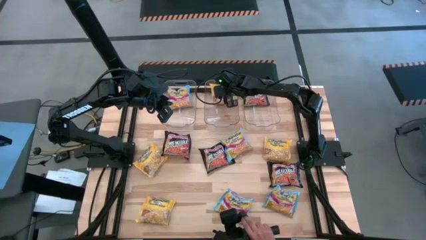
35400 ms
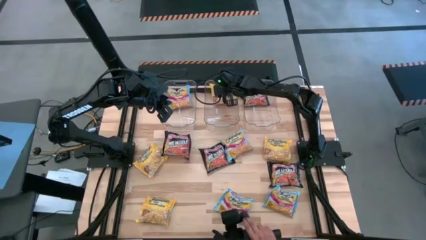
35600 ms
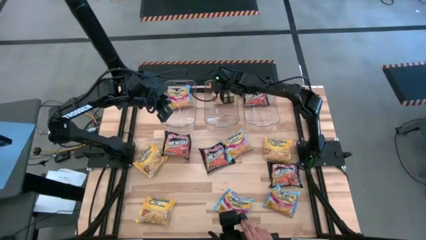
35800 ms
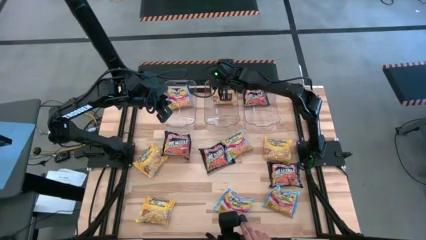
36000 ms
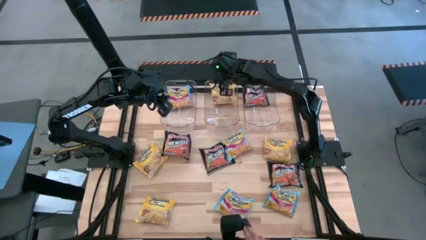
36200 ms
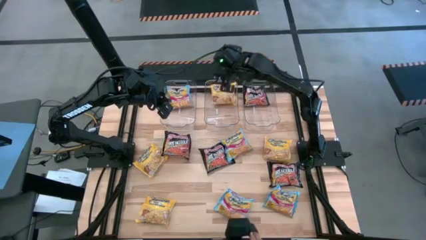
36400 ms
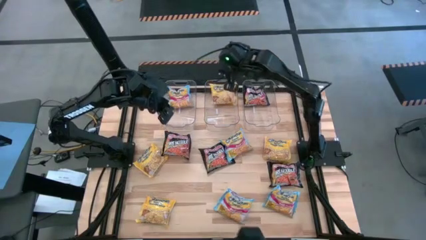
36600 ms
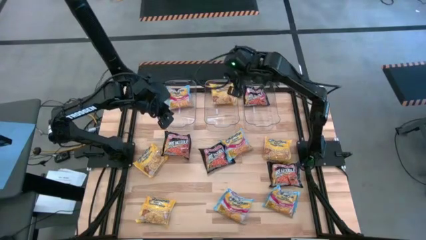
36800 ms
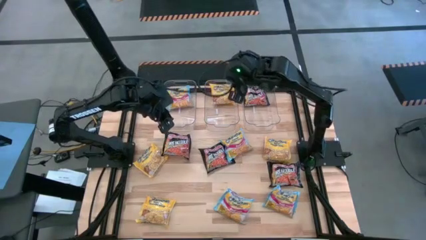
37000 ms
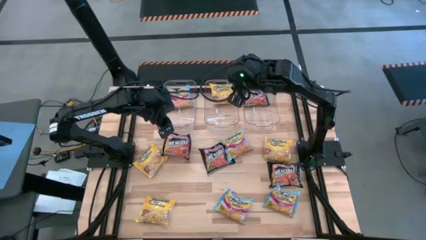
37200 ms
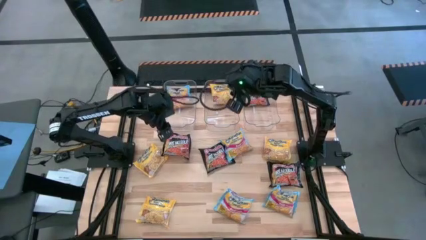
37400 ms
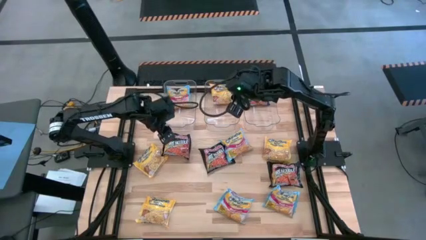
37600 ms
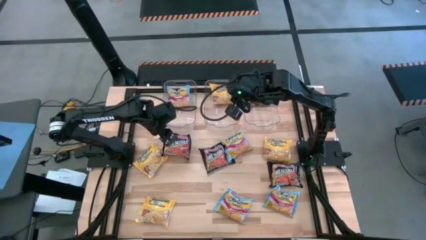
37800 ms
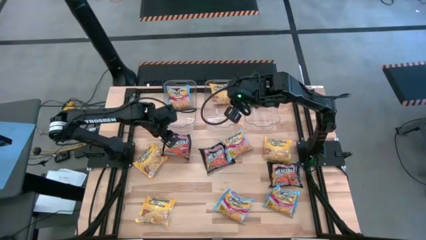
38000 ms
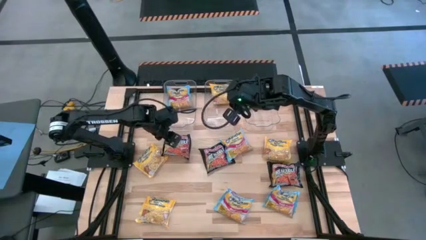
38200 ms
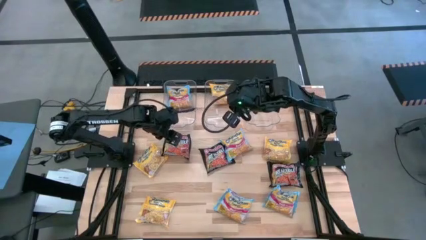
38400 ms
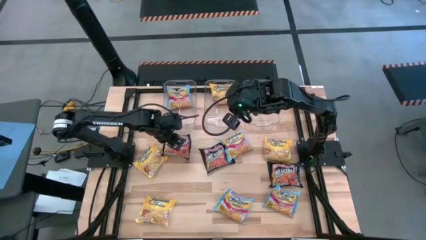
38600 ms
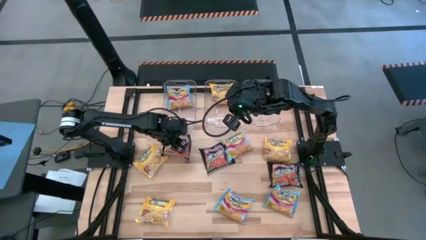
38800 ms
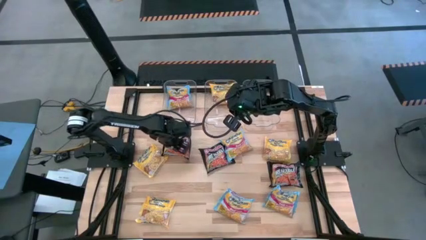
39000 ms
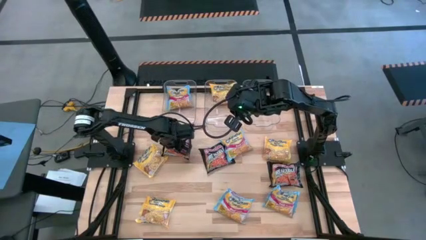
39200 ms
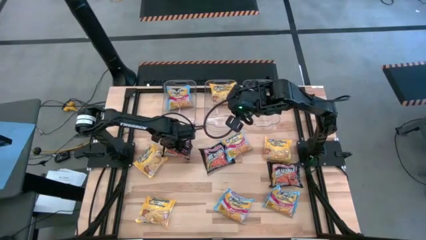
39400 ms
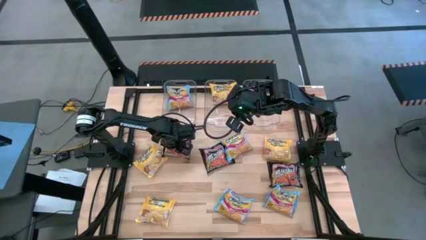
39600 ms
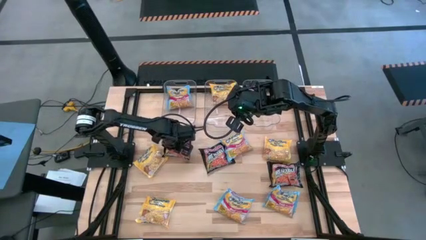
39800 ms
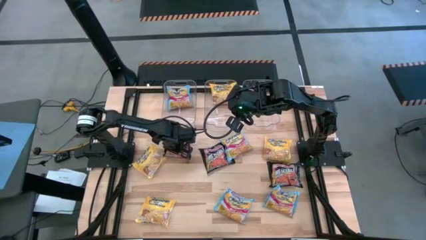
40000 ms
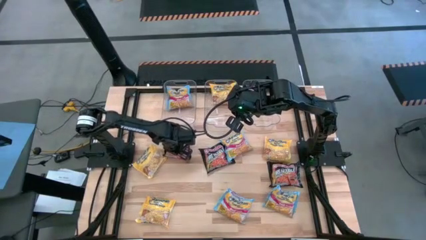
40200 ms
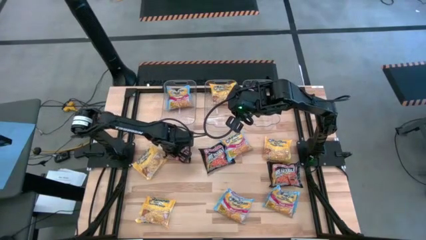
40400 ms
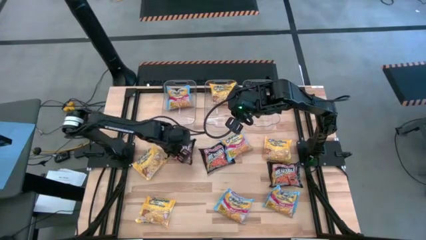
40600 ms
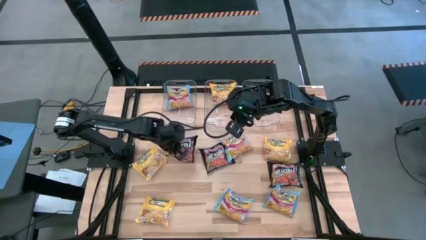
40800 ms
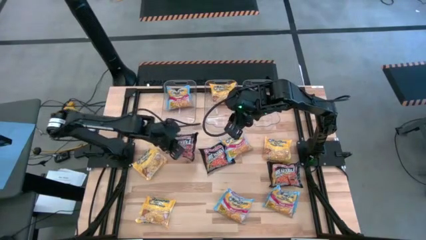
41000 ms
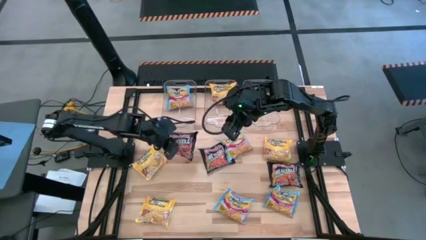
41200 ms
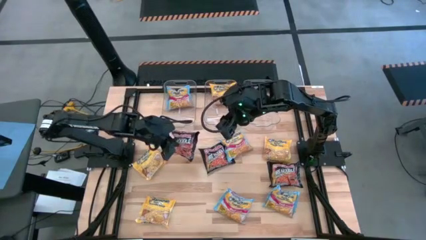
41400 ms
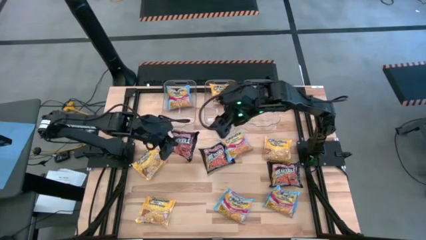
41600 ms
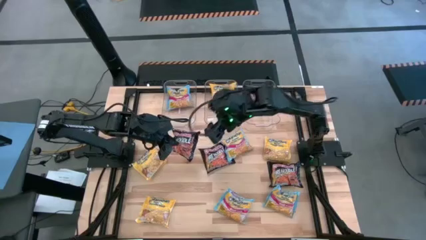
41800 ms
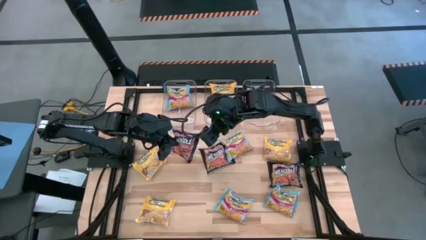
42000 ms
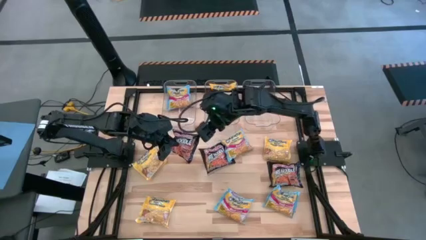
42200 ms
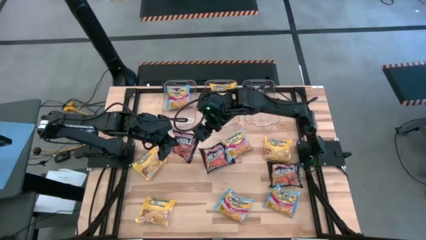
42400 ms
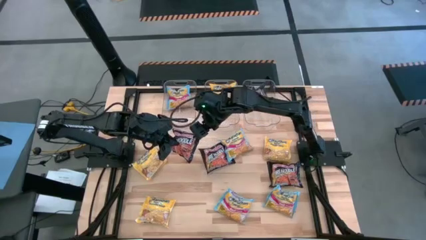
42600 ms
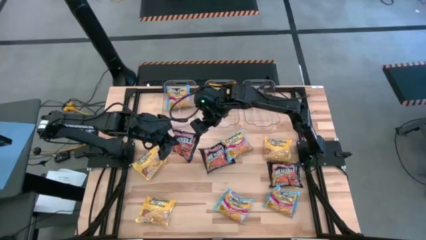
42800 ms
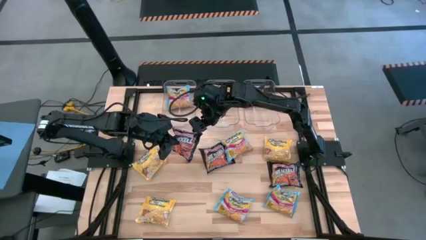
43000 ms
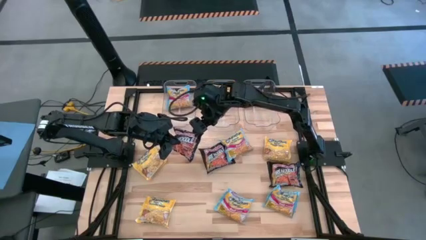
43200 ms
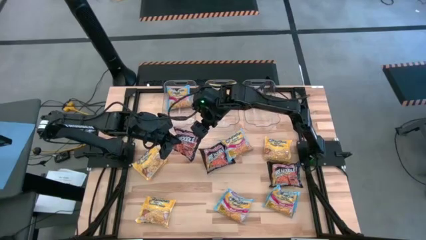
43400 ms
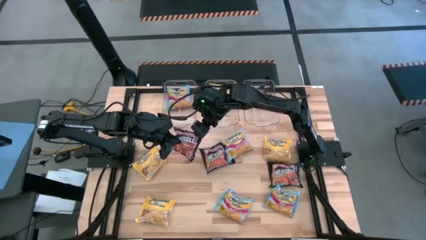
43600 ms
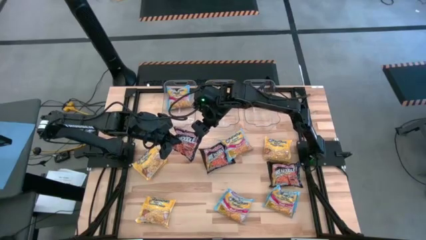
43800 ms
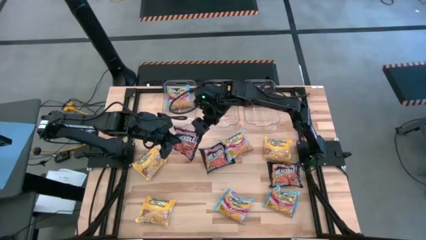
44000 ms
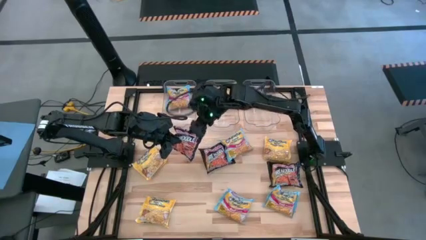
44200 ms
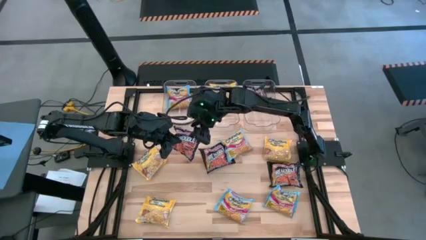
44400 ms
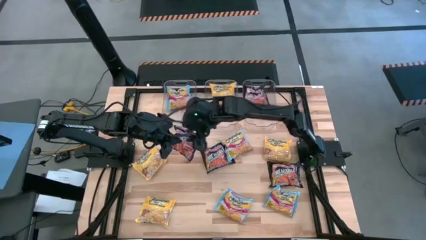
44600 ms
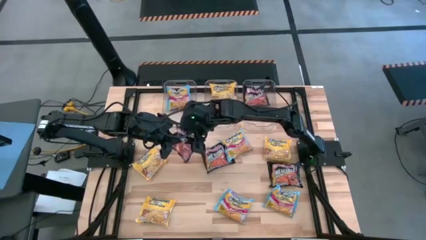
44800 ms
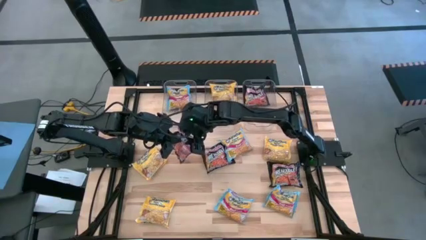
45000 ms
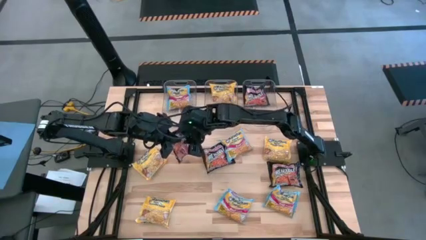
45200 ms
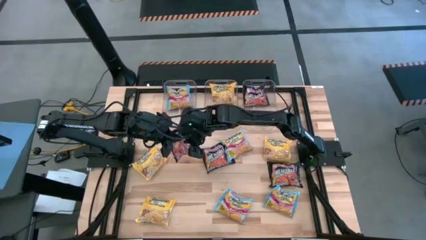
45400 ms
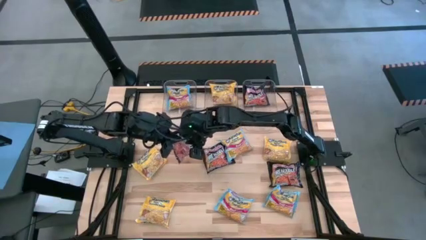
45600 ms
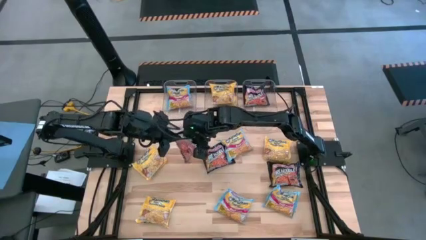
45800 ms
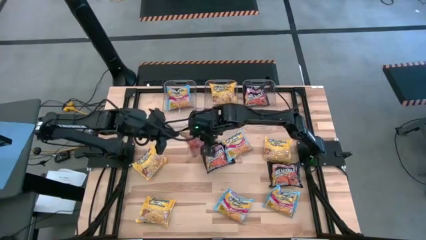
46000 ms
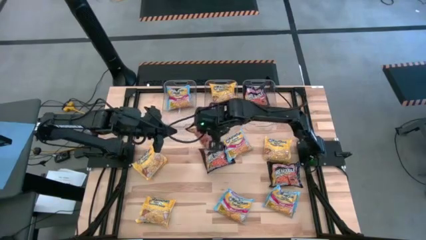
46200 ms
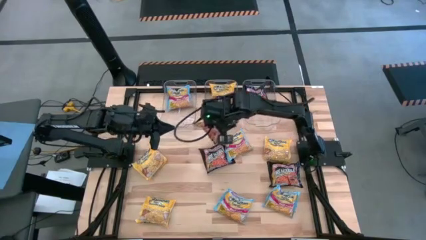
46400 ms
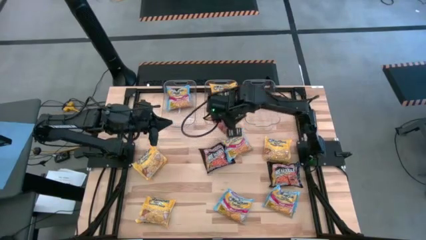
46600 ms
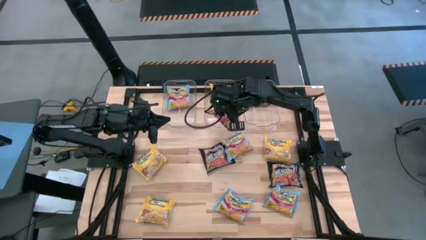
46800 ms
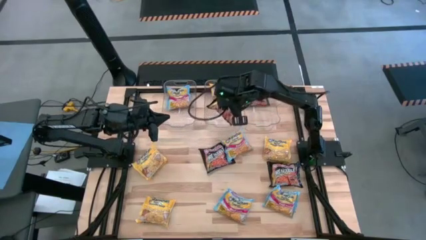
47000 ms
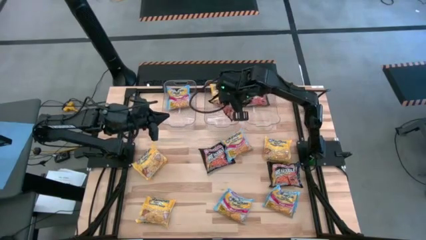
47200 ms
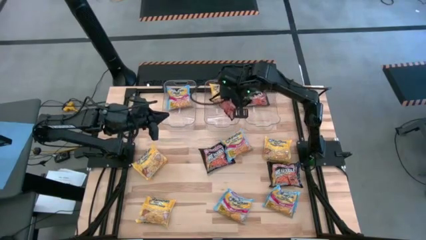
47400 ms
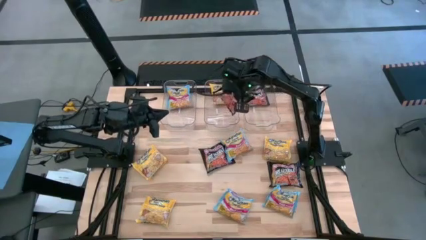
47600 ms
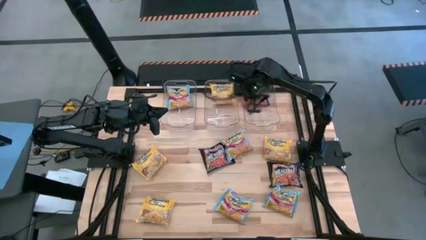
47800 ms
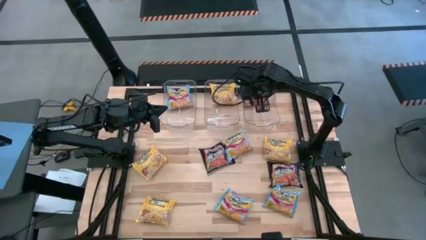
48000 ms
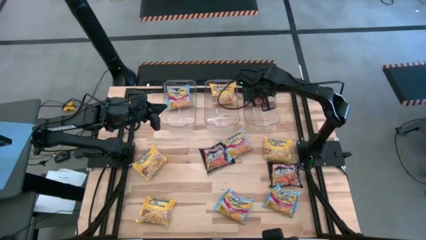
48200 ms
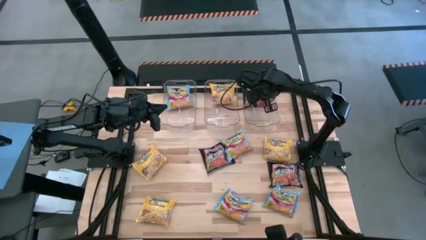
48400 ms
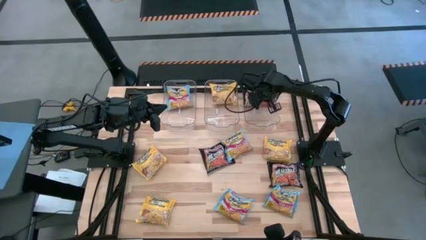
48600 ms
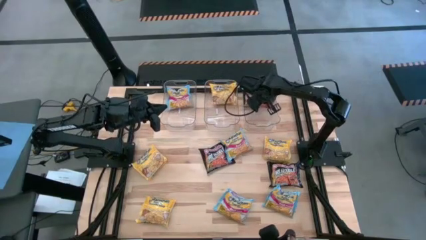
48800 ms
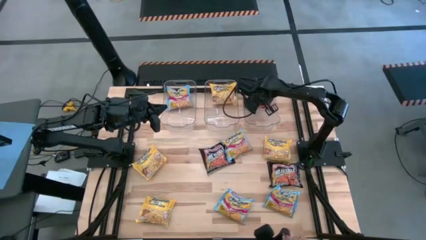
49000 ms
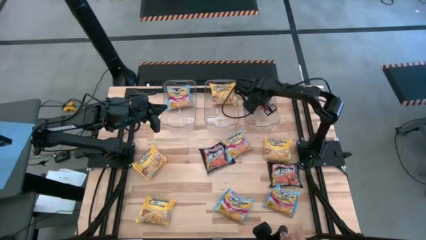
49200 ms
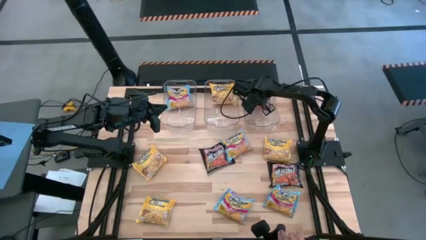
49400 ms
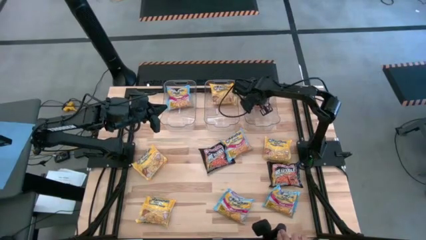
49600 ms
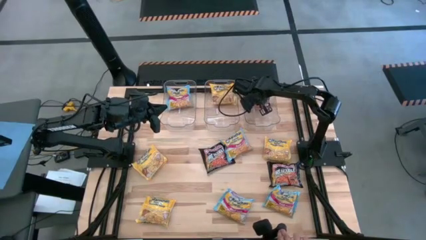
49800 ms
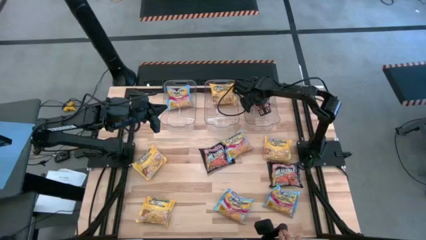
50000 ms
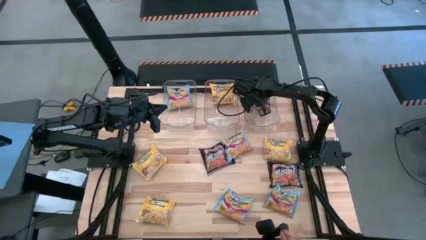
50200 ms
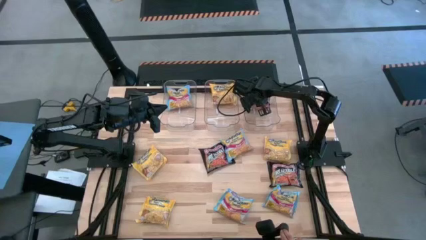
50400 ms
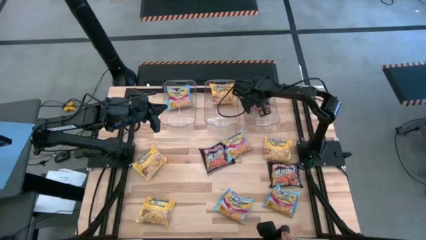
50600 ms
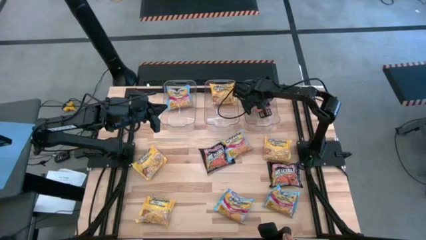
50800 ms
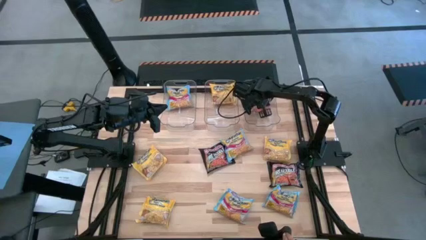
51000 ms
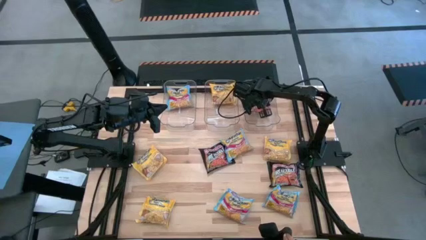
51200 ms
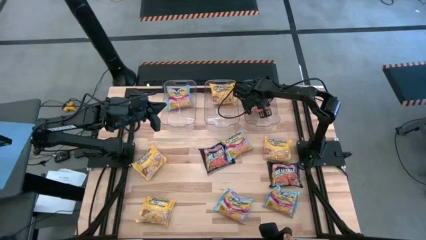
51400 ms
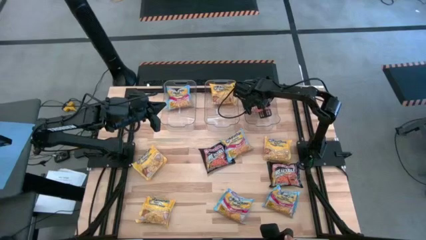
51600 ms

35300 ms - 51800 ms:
Task: Sort Maruchan noodles
Put the black noodle pack into the right transparent bin
